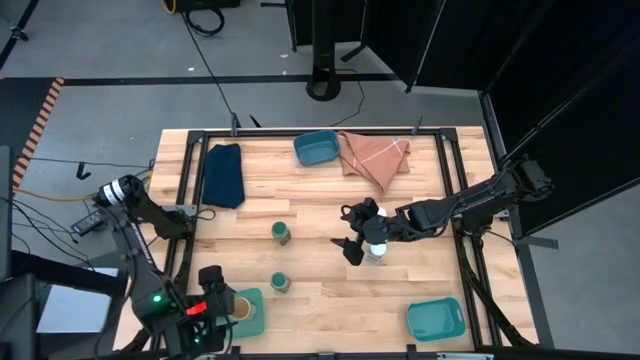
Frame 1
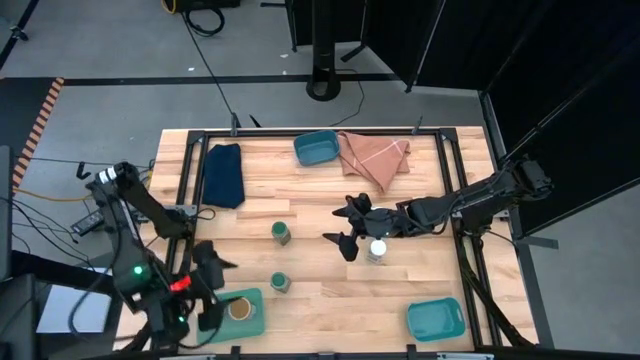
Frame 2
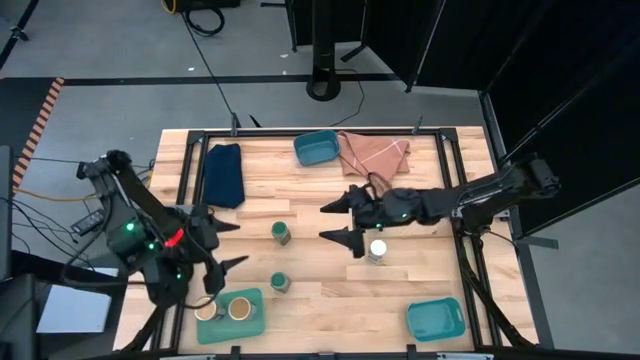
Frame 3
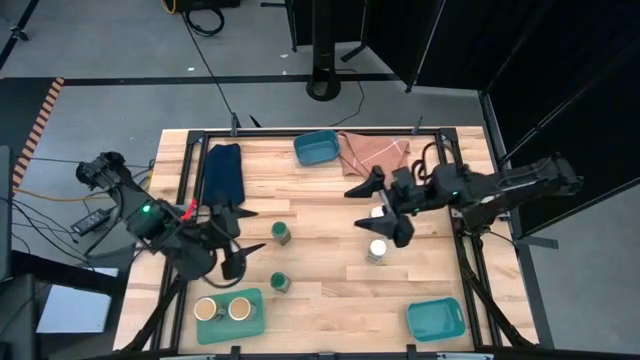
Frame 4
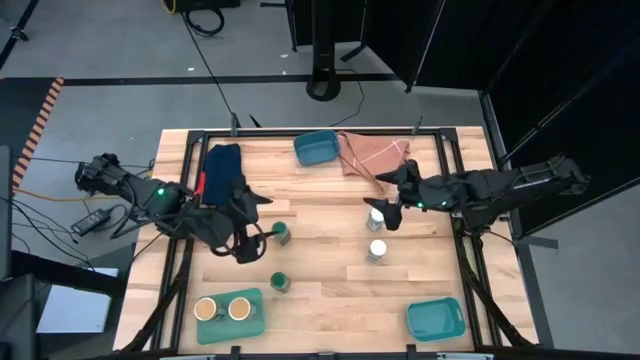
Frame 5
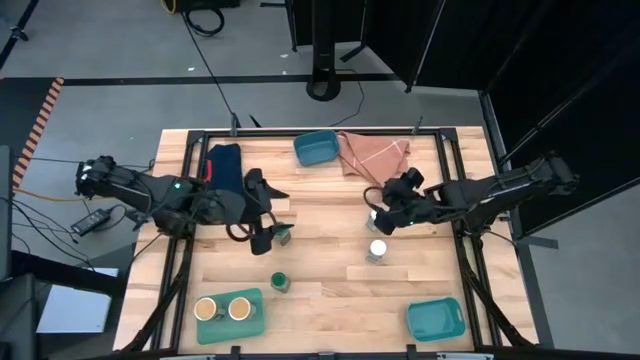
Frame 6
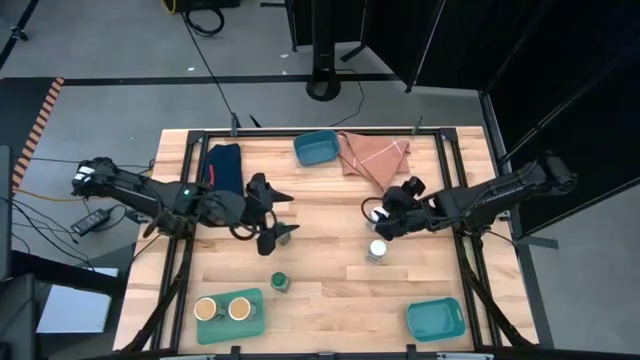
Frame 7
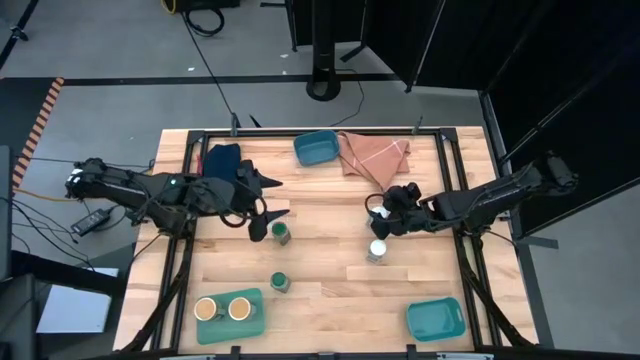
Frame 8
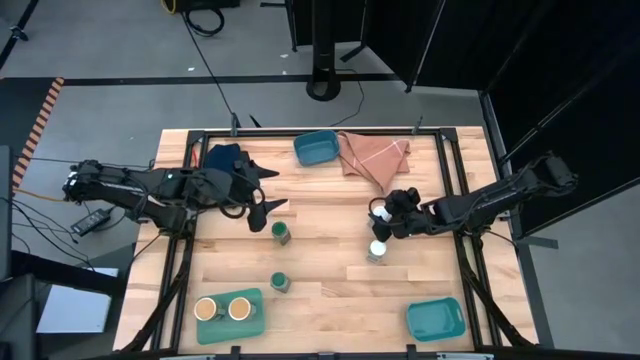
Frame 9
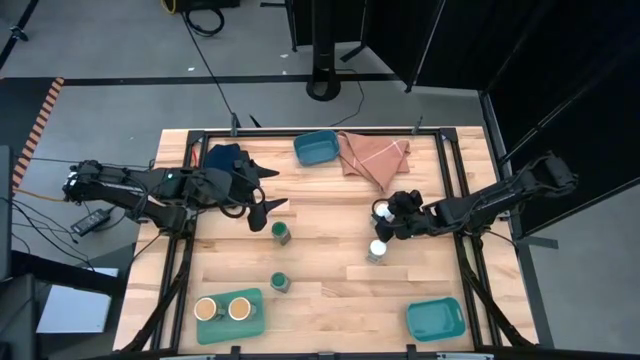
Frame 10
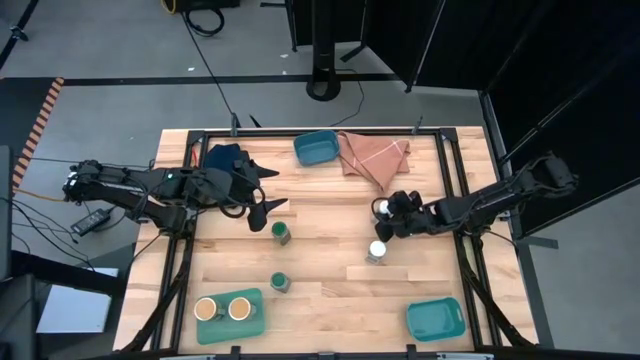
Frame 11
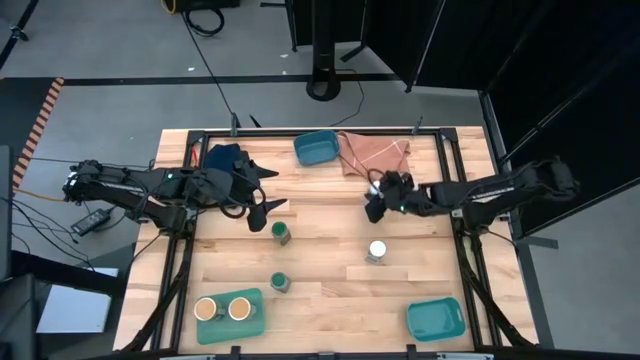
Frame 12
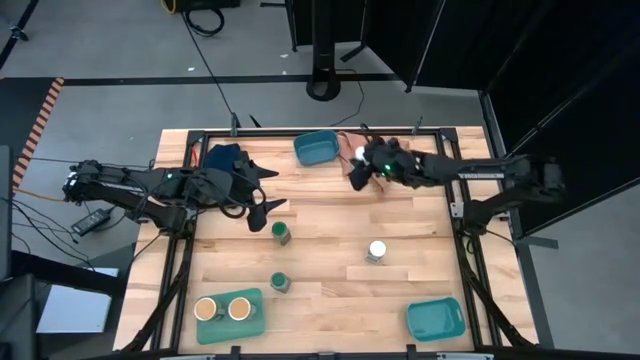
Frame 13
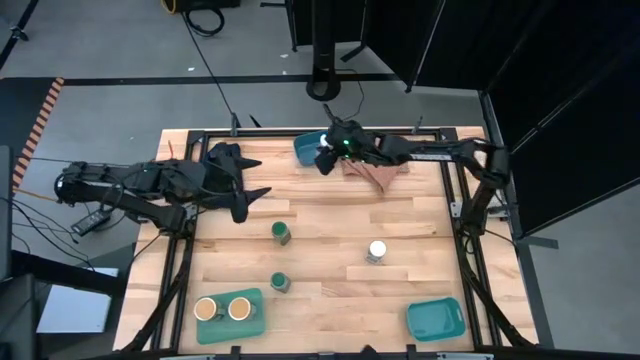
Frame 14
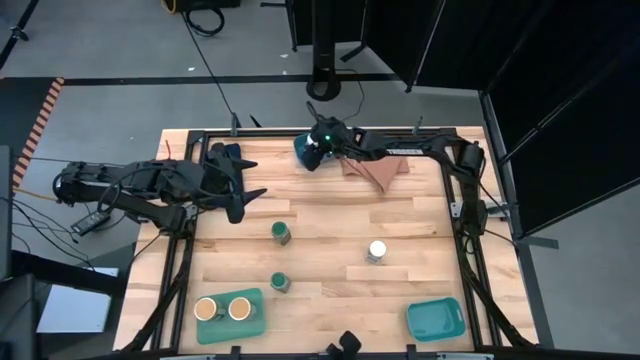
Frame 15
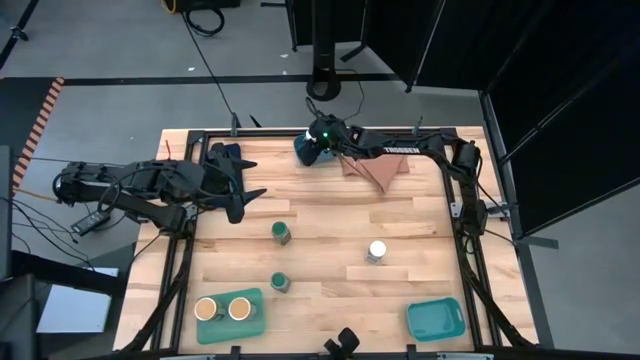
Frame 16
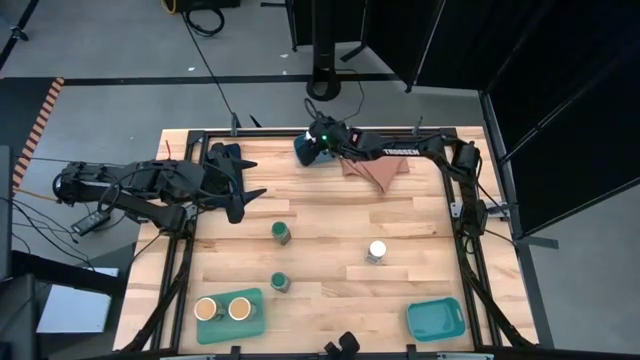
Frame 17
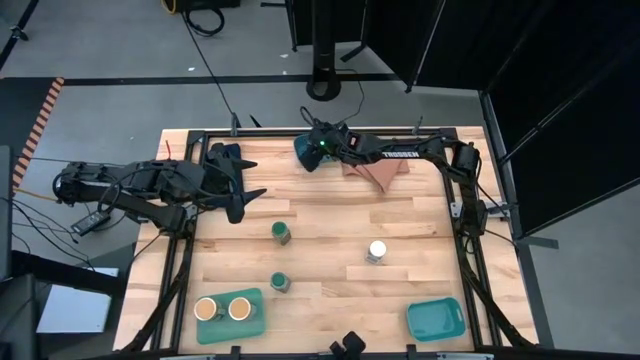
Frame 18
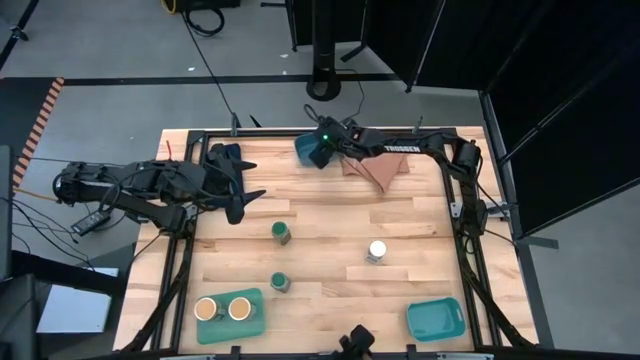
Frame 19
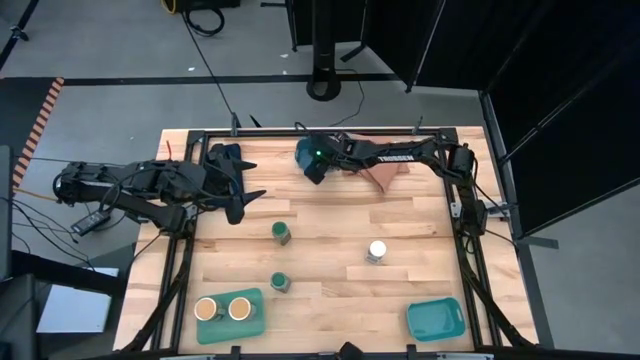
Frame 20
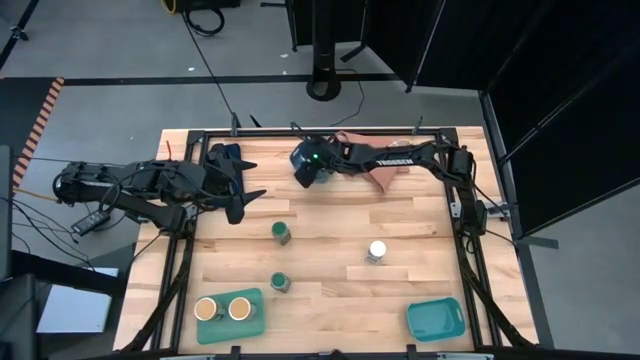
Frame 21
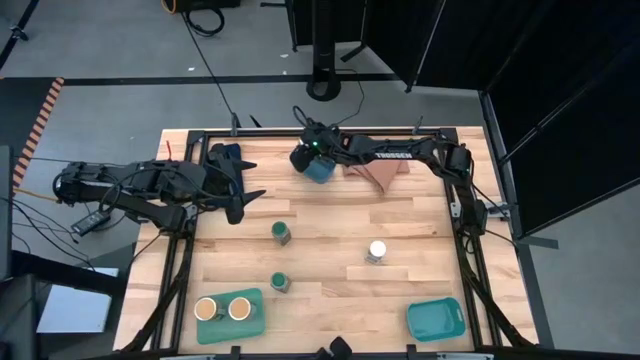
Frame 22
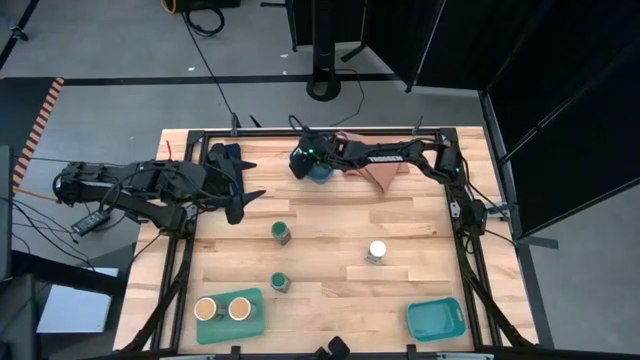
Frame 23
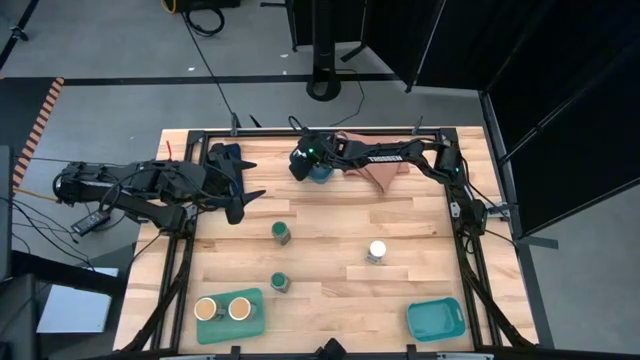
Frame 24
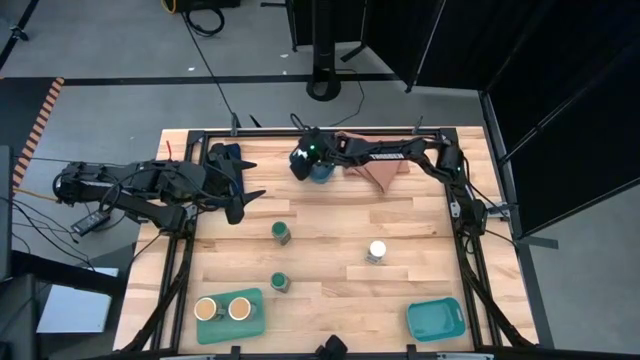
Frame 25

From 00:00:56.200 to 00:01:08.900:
Task: Sort spices by type
Put the top white seasoning bottle into the blue bin

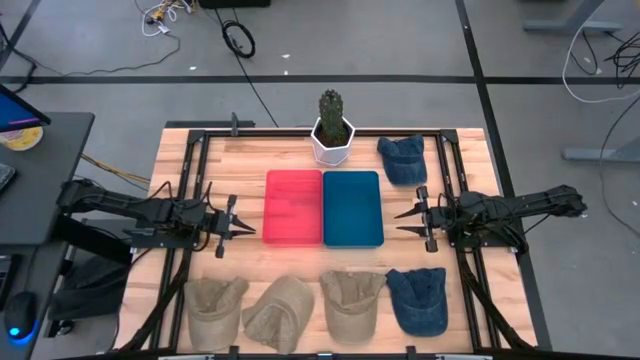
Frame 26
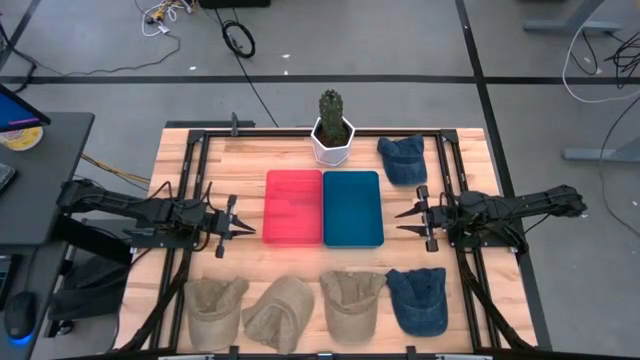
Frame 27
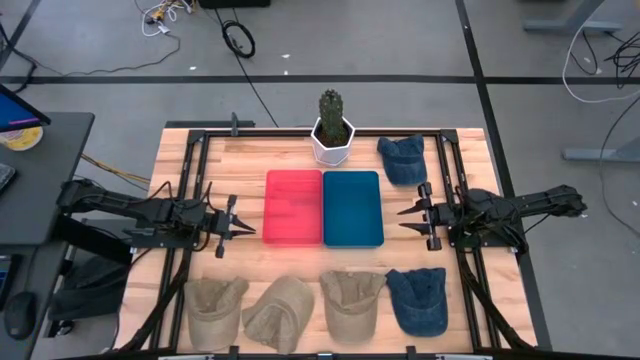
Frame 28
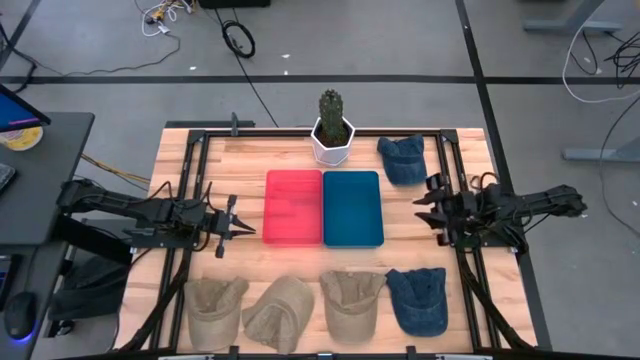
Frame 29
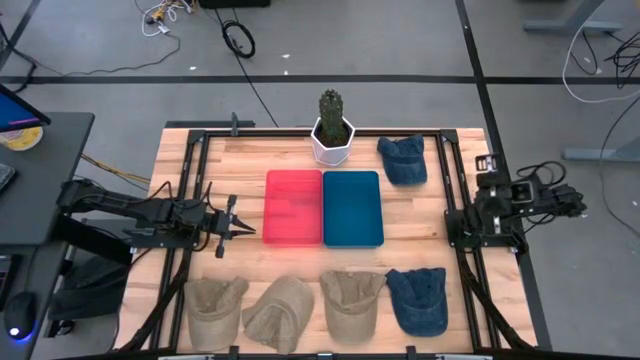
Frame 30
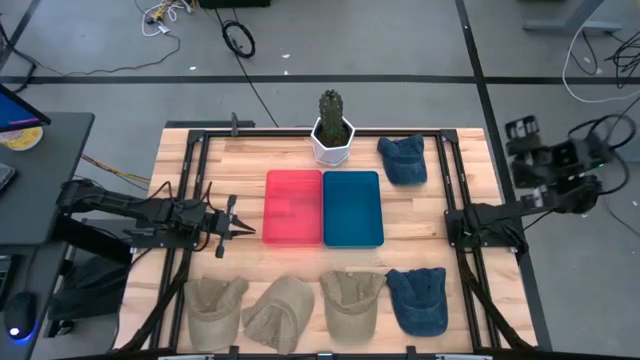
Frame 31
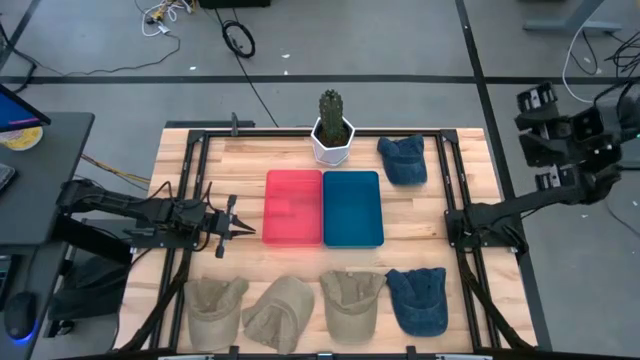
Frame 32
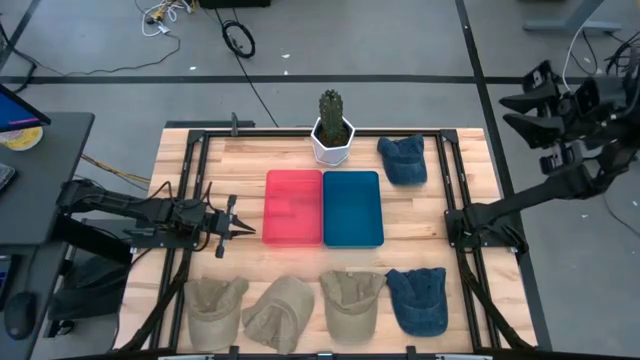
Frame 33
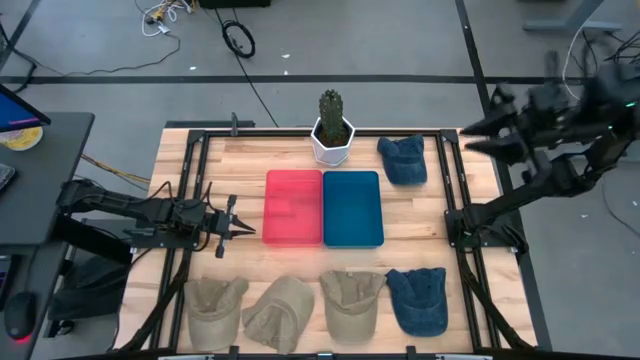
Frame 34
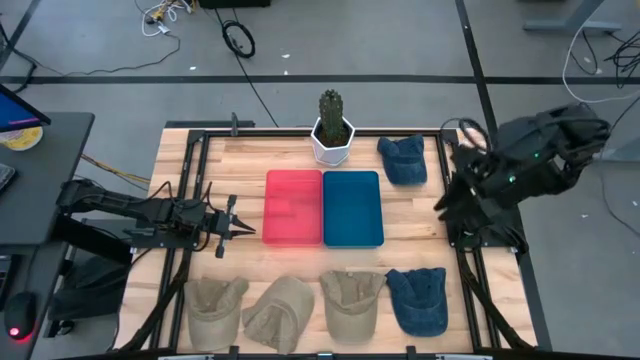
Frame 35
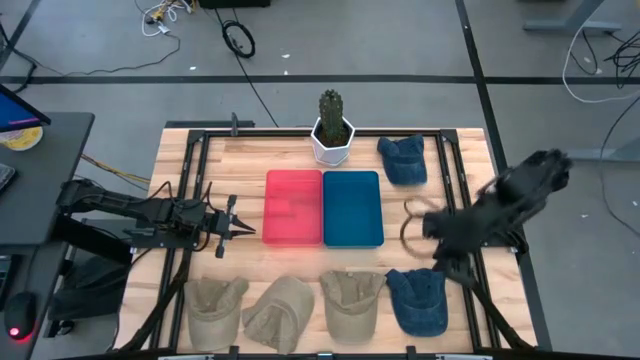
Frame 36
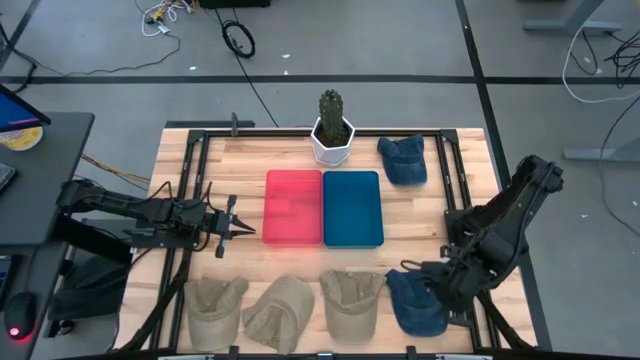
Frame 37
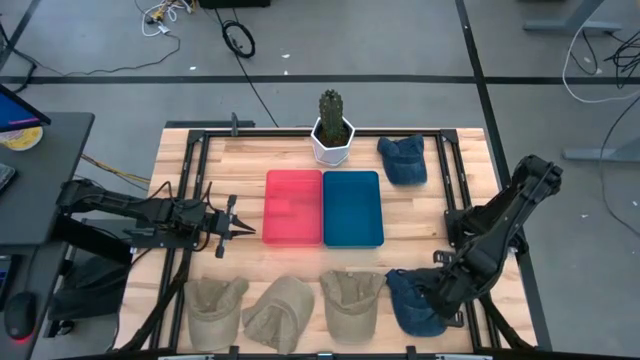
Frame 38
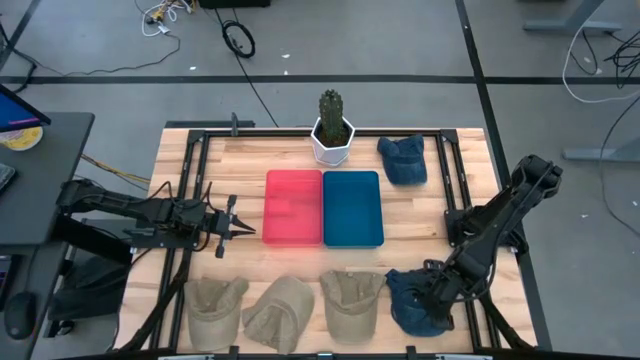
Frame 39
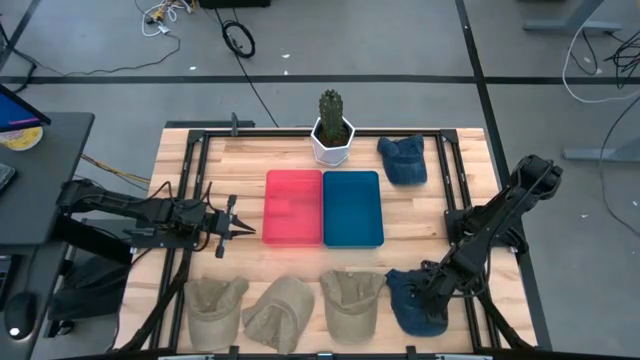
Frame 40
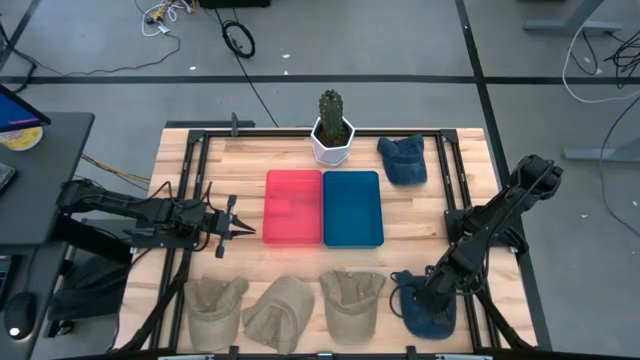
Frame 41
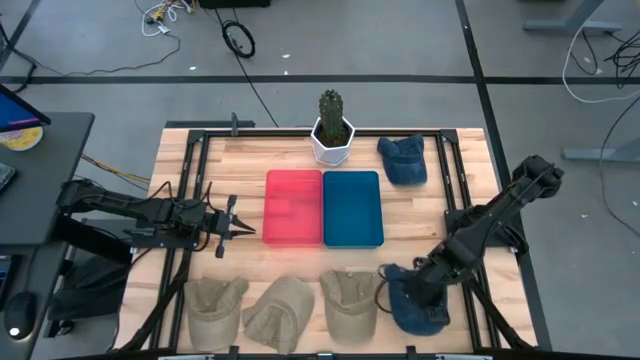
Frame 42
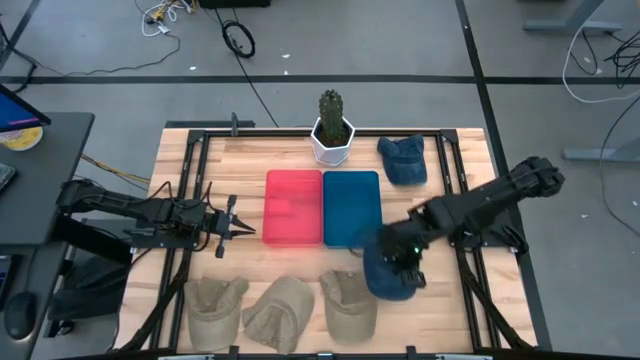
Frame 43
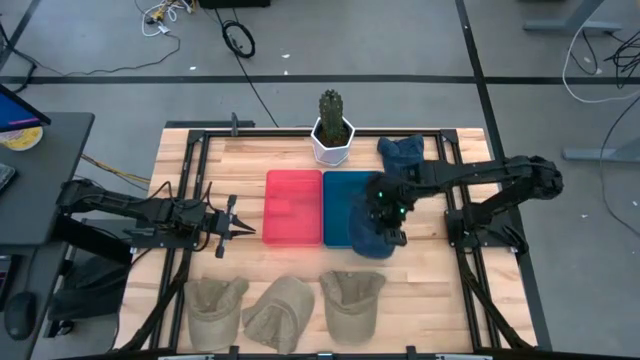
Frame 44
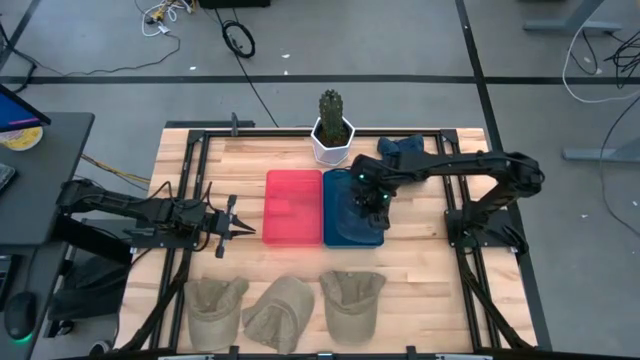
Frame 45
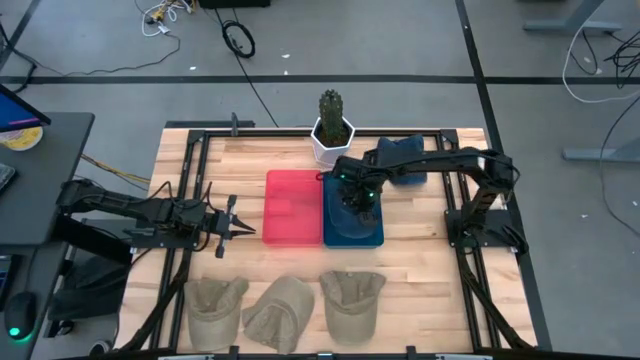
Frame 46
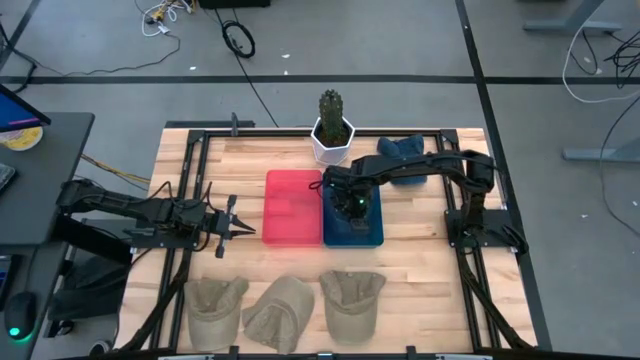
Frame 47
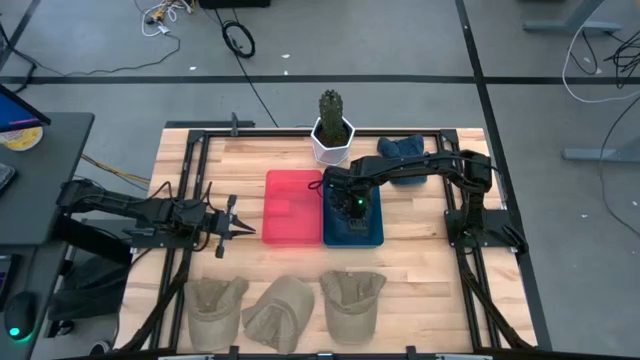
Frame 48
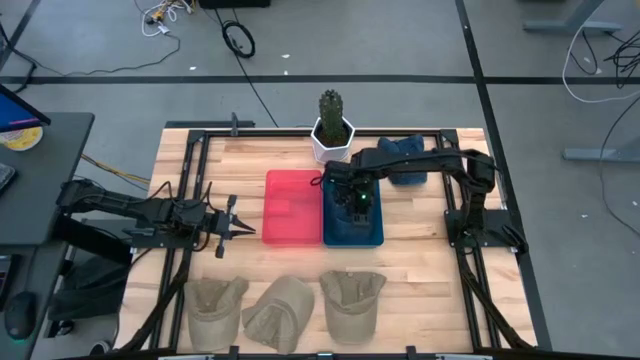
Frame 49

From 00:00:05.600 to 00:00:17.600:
Task: Pick & Place hat
Put the bottom blue cap into the blue bin
